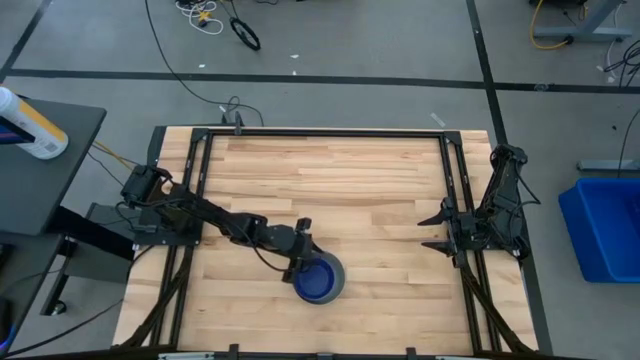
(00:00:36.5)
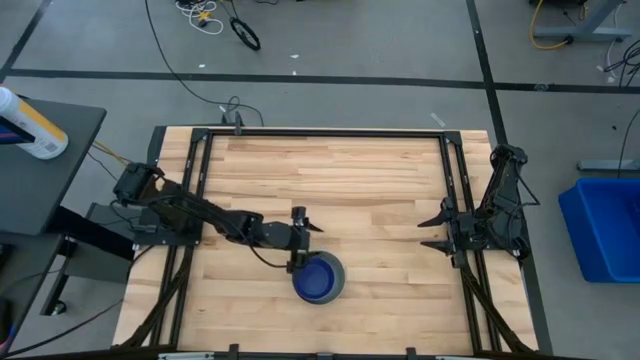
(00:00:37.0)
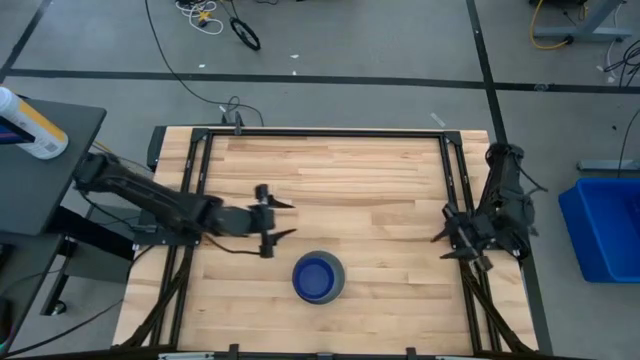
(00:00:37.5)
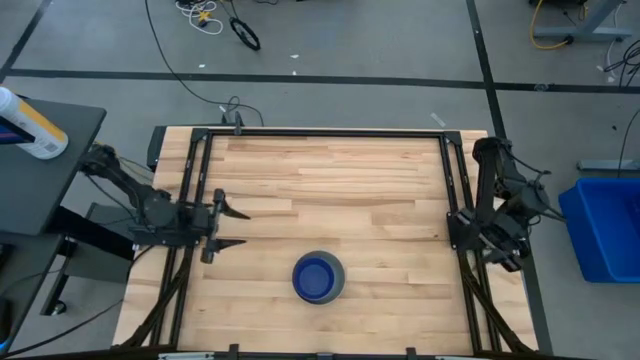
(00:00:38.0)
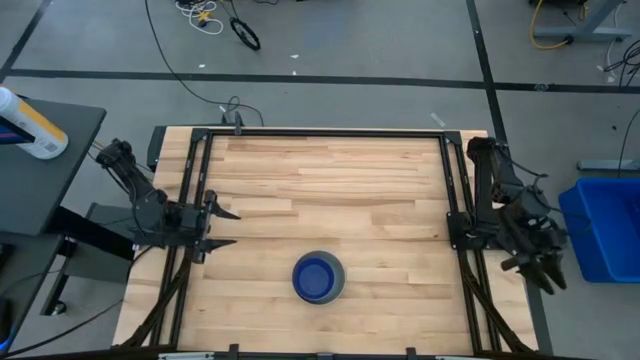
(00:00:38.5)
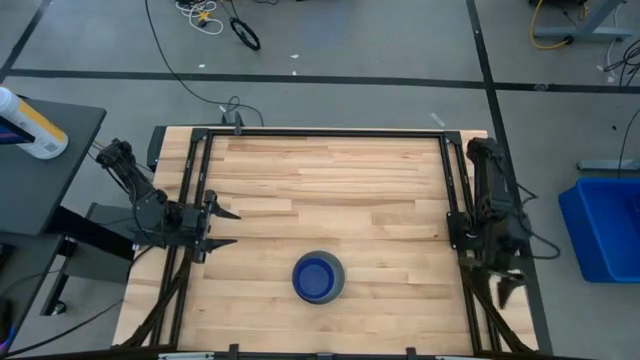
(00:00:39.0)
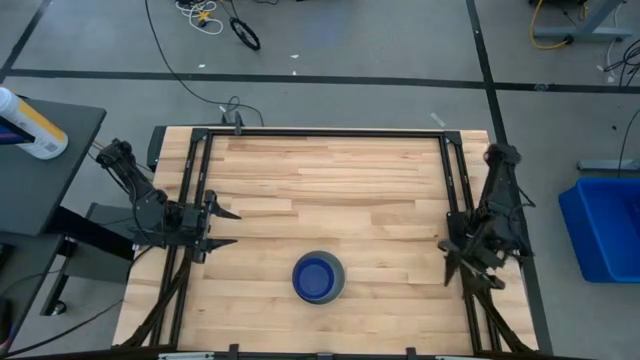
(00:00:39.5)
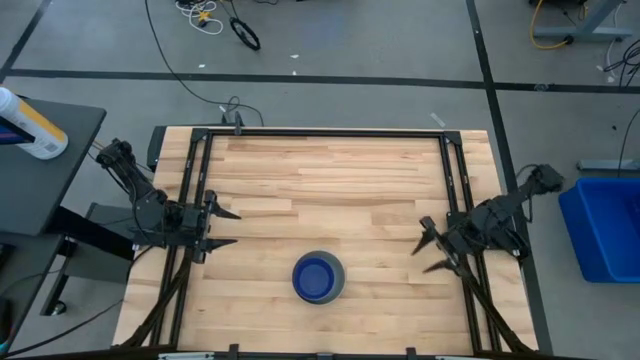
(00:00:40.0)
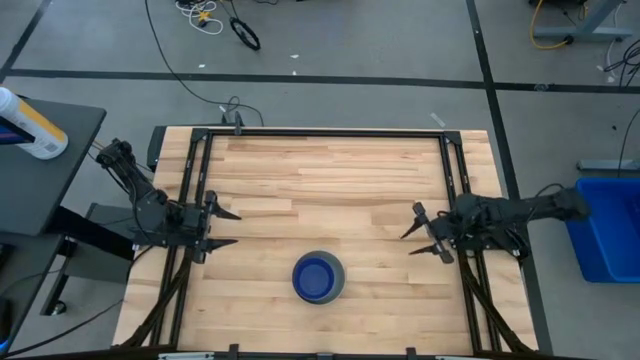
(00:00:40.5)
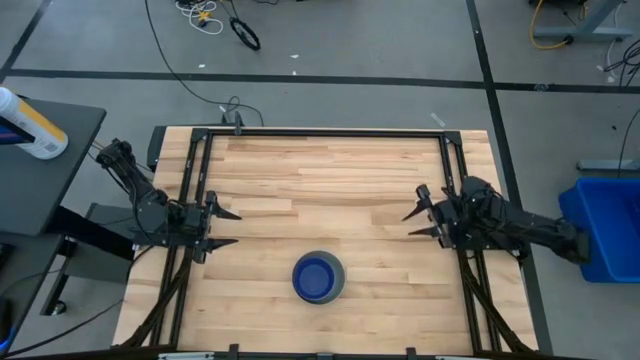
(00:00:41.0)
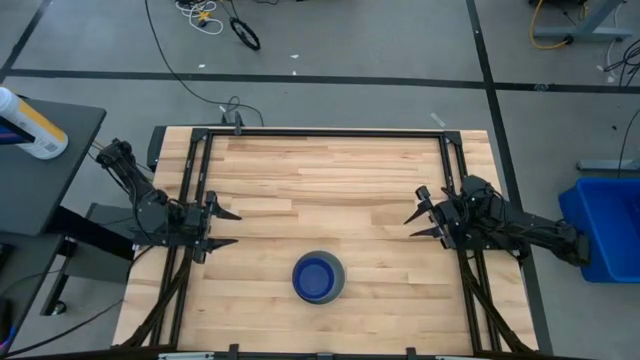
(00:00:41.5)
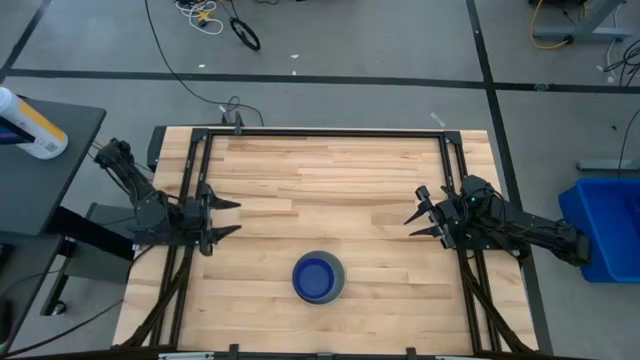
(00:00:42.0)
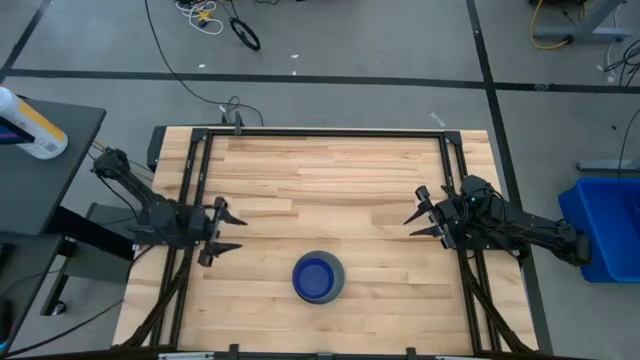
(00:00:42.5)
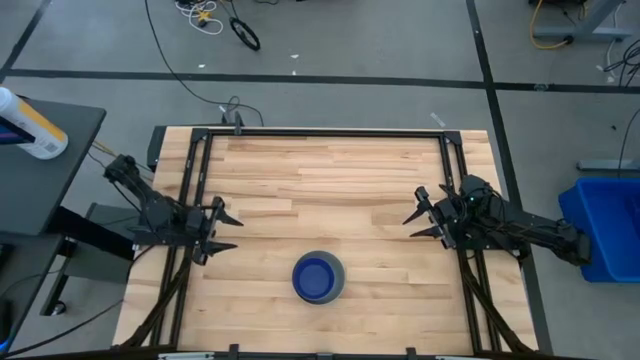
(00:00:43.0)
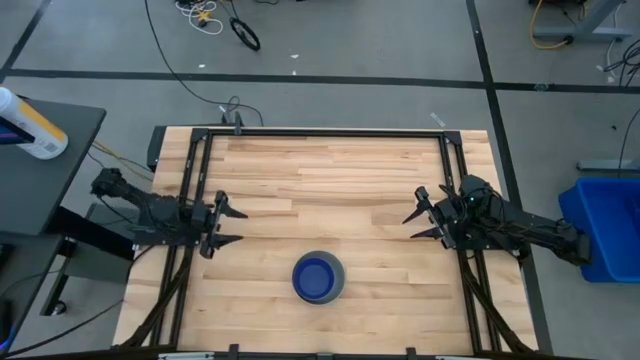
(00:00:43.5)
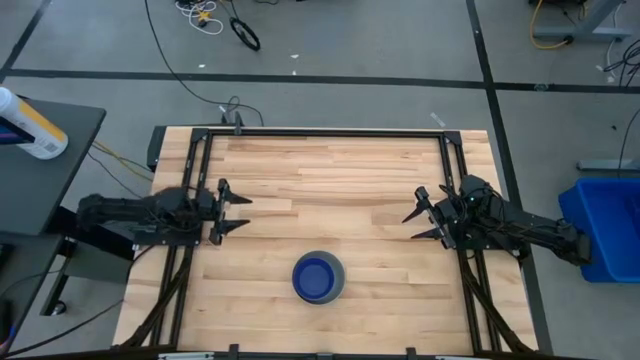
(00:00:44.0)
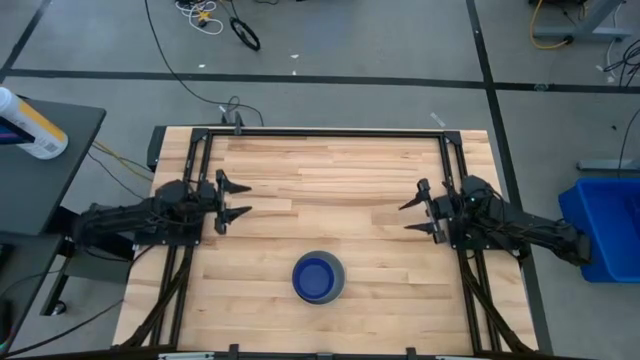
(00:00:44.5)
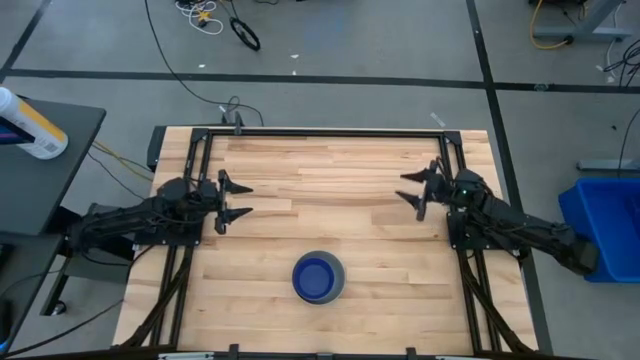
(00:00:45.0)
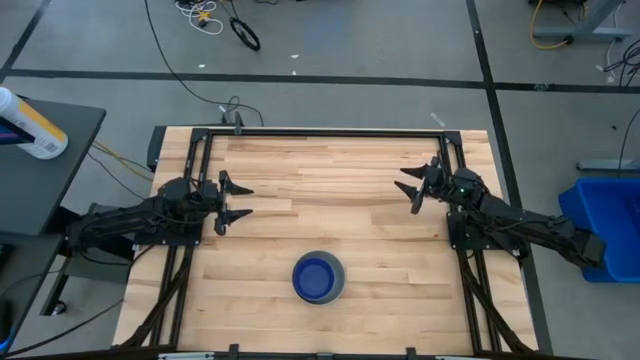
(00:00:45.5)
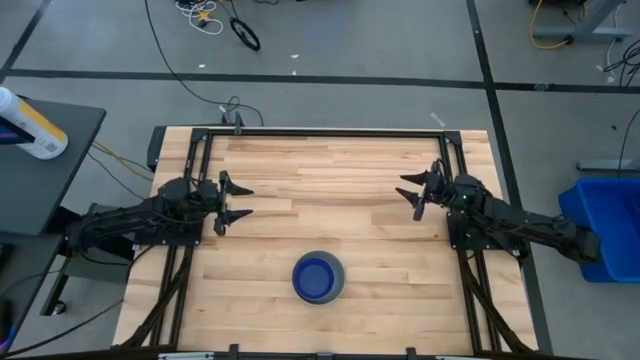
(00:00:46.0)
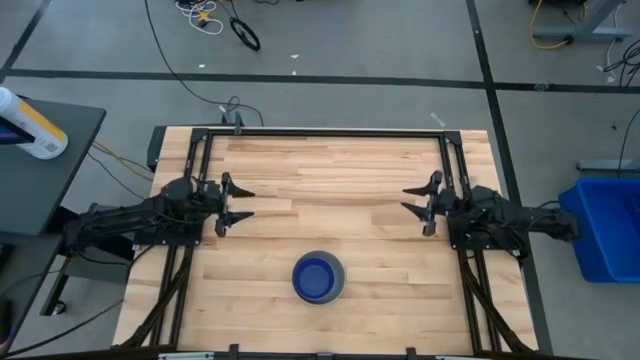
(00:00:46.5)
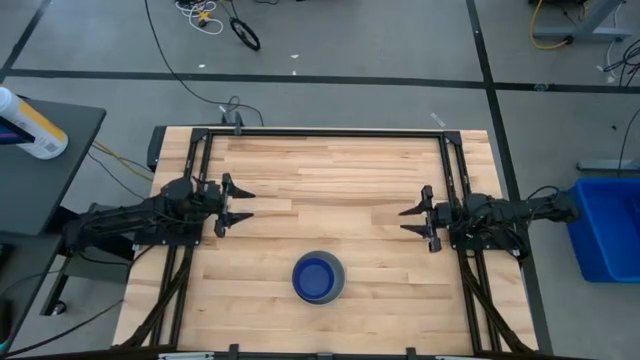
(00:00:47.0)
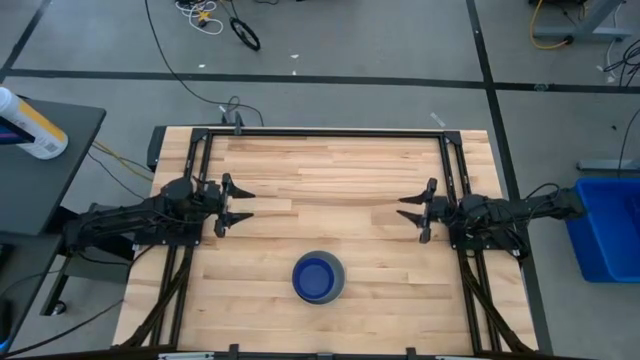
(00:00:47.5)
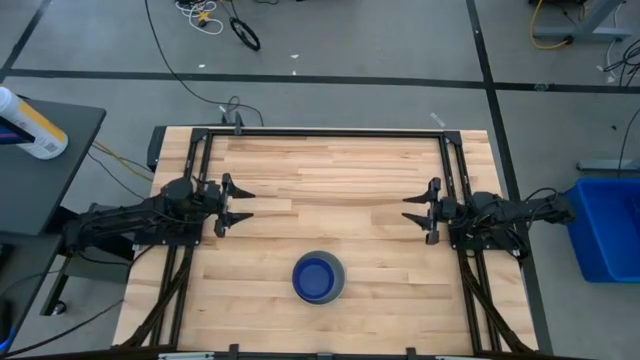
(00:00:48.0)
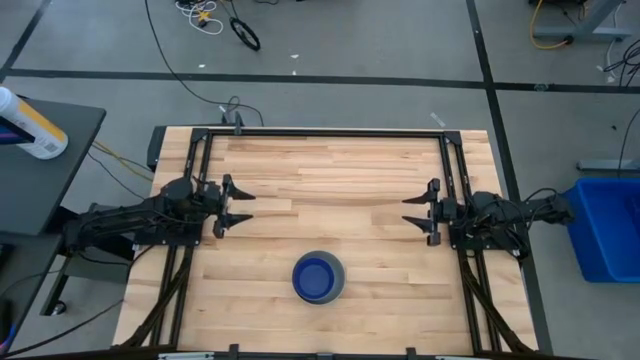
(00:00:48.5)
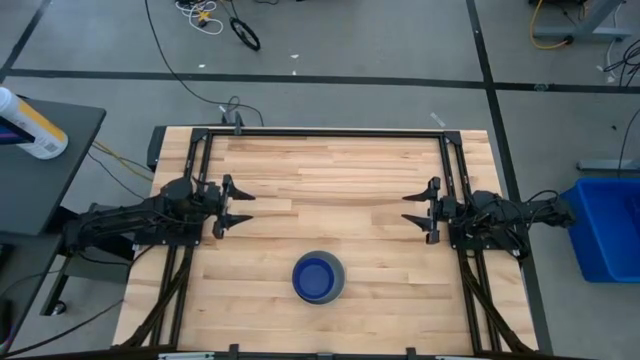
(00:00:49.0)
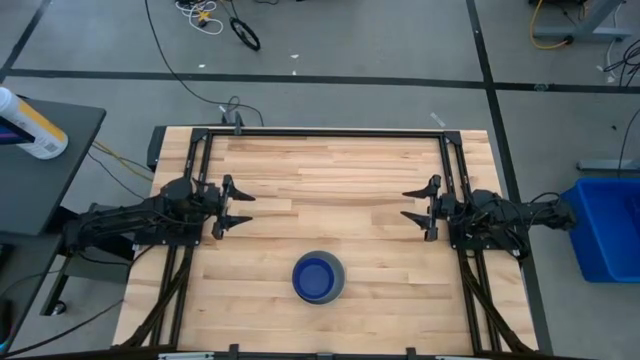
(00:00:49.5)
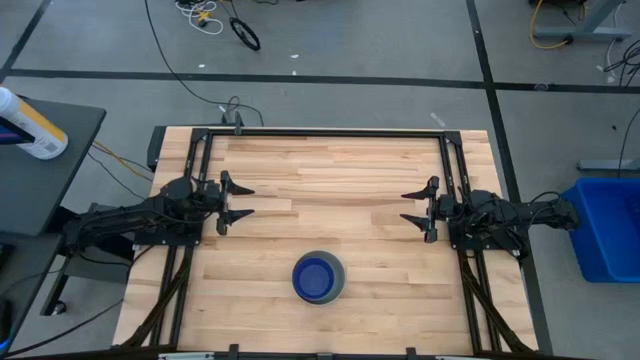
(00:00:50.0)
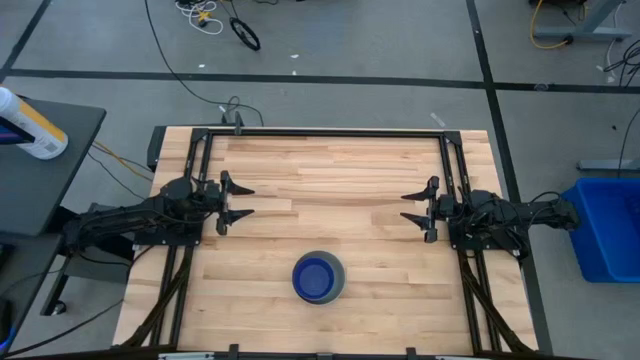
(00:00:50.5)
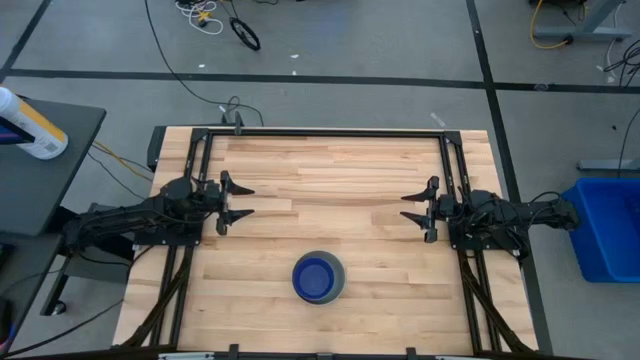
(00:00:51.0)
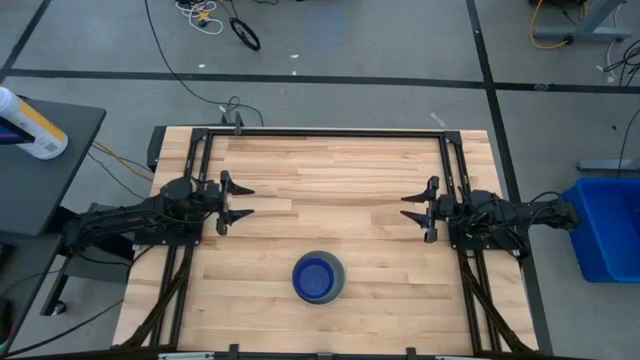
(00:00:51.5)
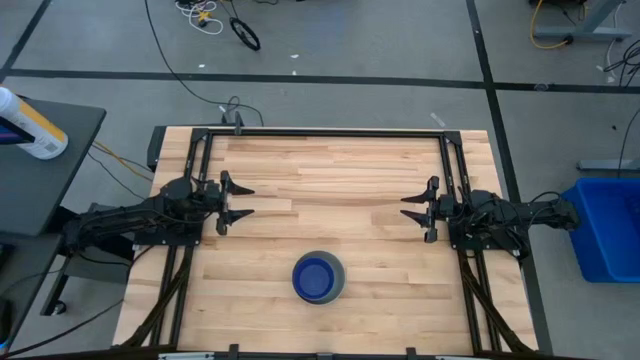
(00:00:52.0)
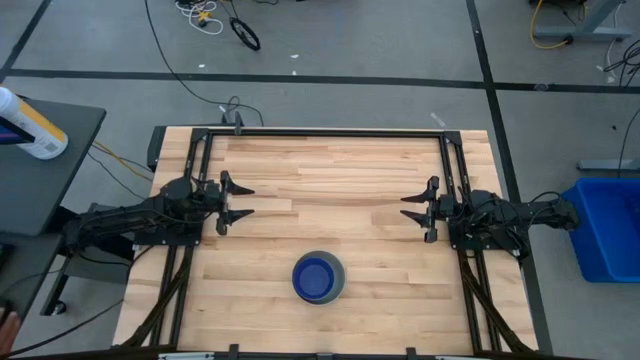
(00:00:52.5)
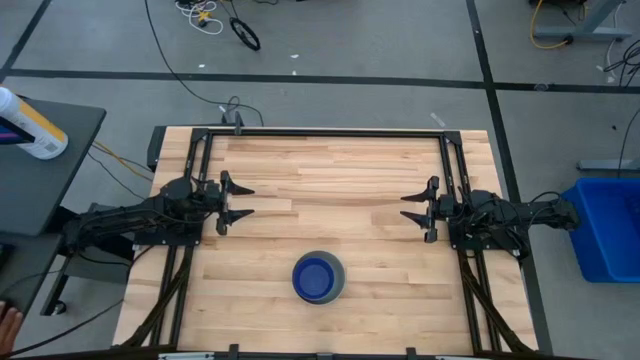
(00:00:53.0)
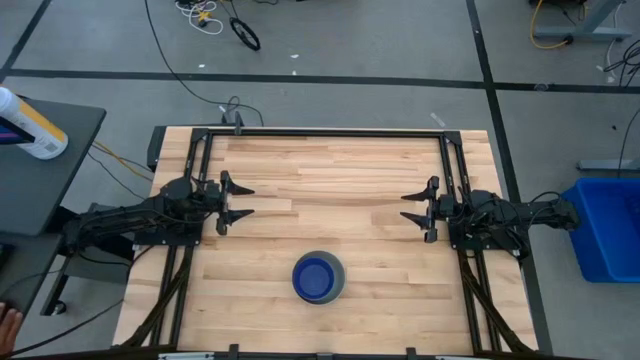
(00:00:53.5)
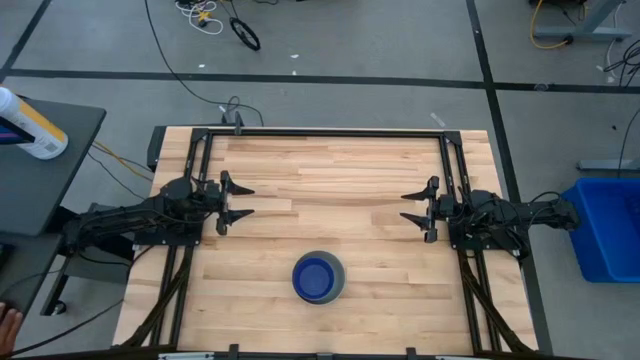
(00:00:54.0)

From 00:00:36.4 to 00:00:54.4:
Return to Home Position

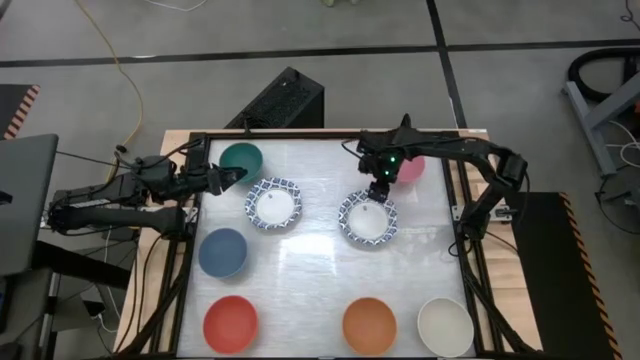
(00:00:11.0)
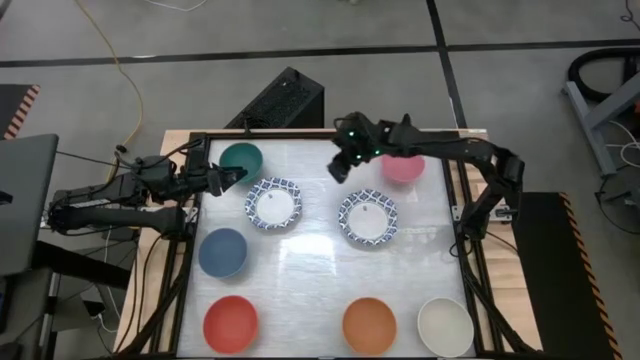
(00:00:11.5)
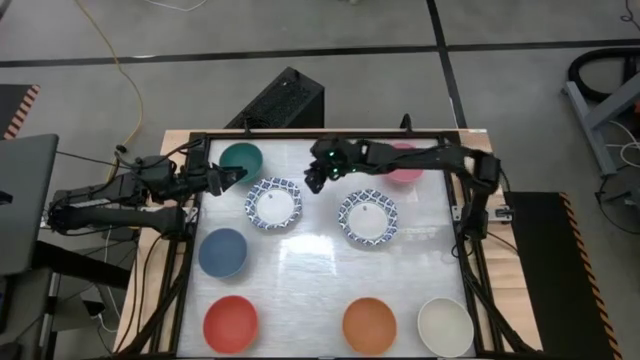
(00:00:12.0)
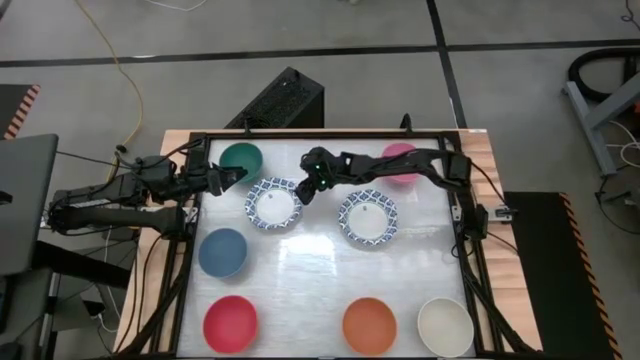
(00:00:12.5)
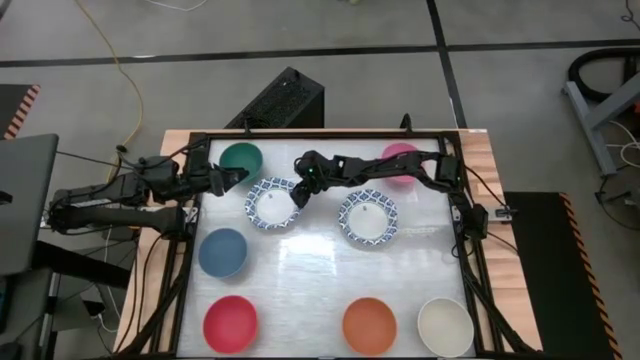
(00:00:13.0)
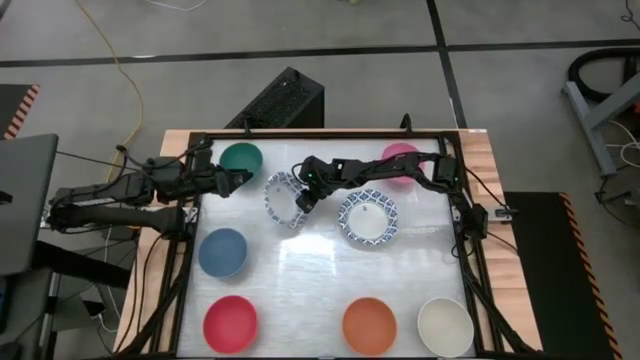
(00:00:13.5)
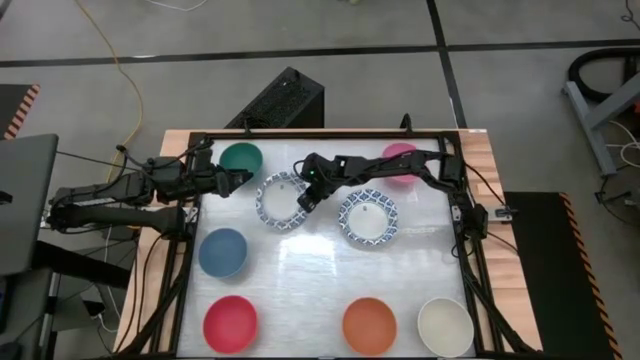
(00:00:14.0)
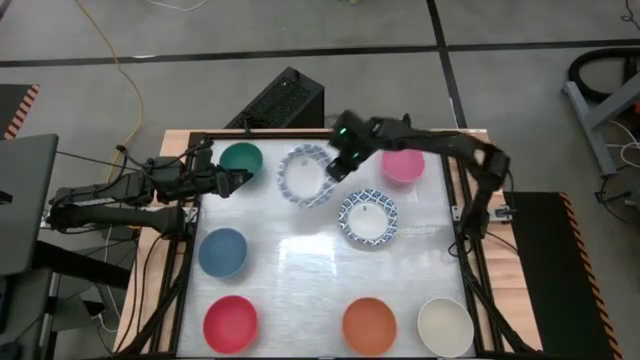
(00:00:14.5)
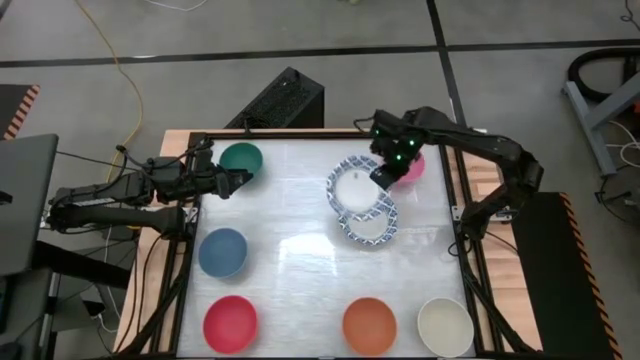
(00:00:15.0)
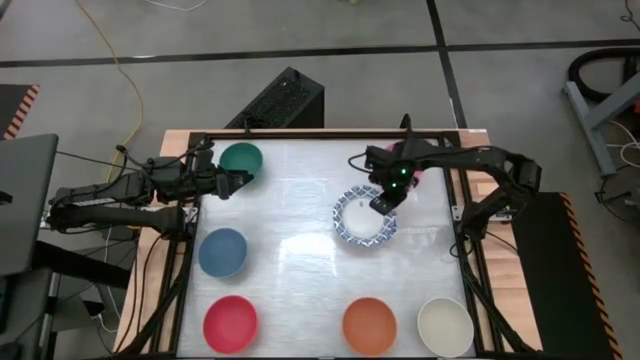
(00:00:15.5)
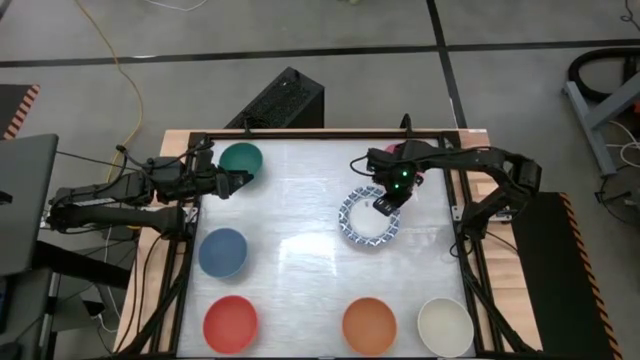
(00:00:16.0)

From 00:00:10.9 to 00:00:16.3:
Stack the left white and blue bowl on top of the other right white and blue bowl
